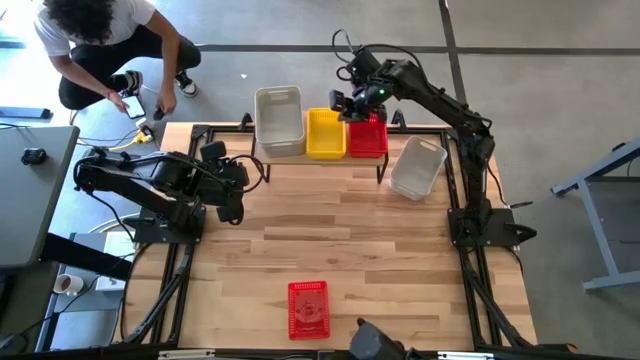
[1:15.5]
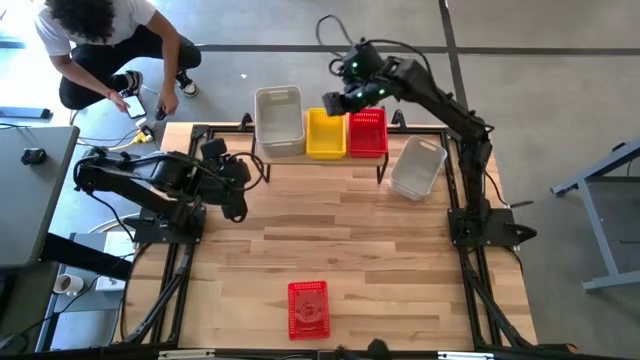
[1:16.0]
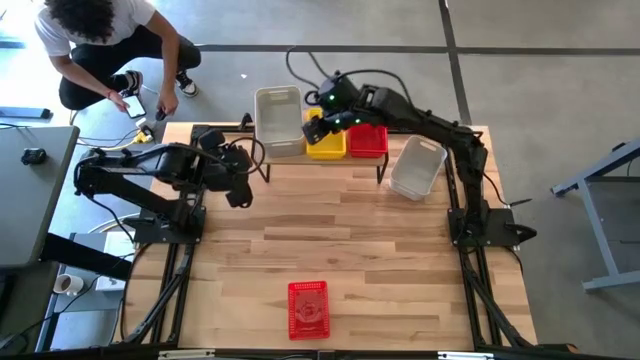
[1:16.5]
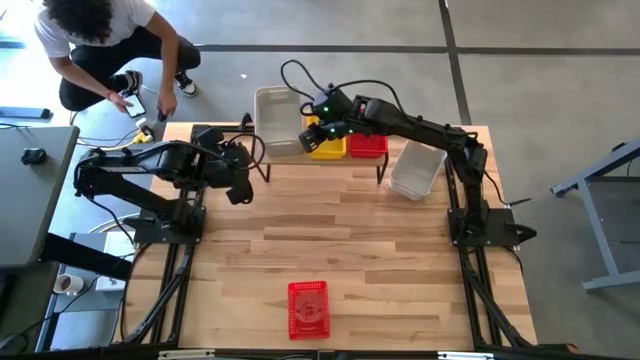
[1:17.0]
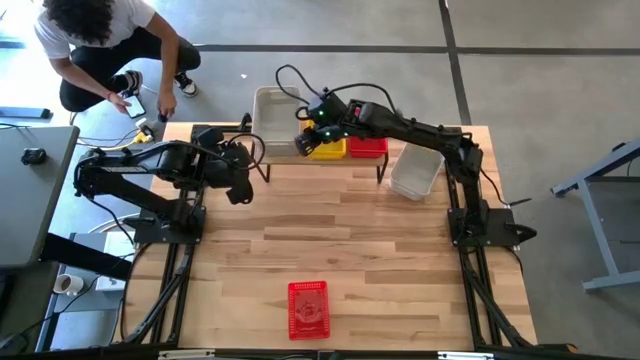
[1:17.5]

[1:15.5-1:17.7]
Task: Stack baskets on shelf by color
Adjust the stacked of gray bins on the shelf

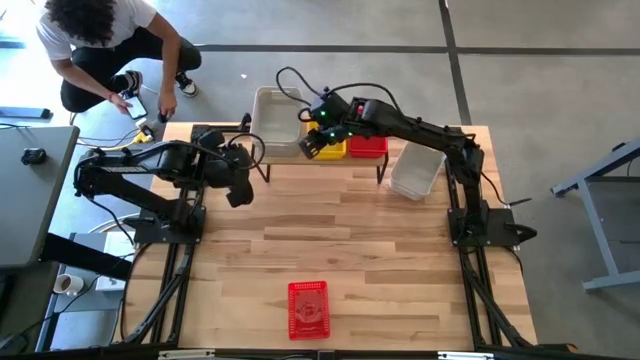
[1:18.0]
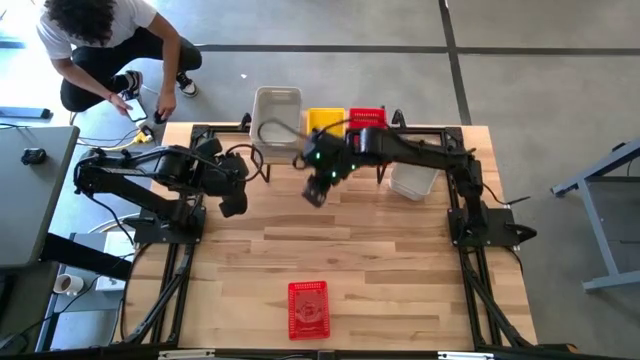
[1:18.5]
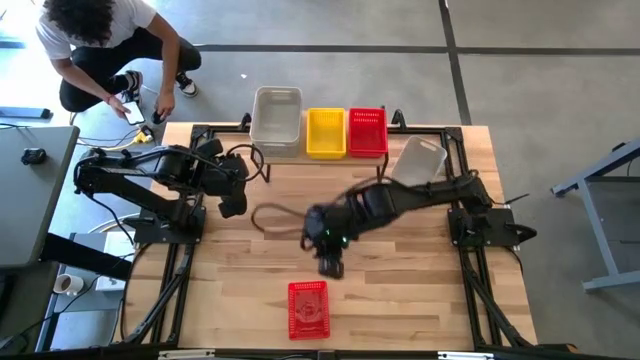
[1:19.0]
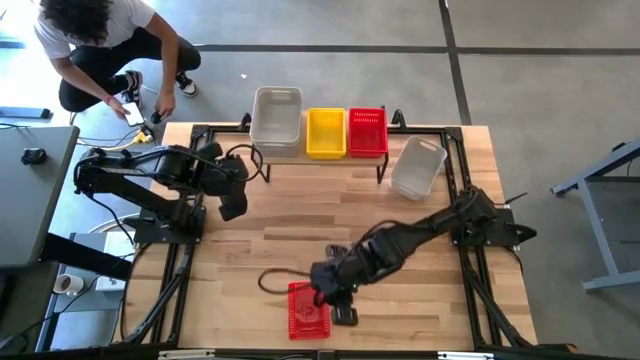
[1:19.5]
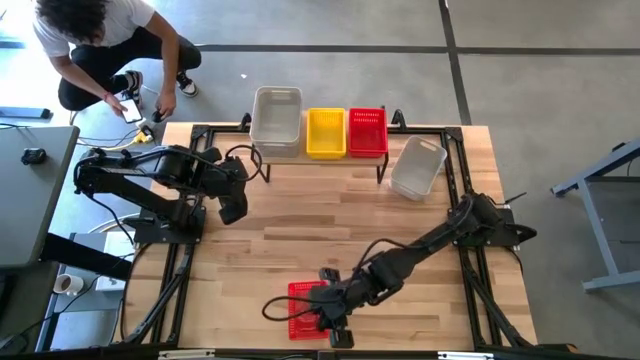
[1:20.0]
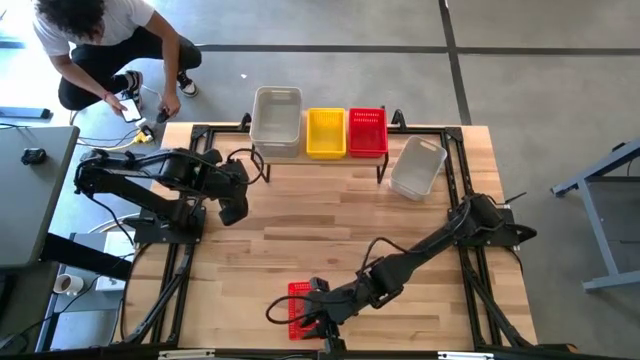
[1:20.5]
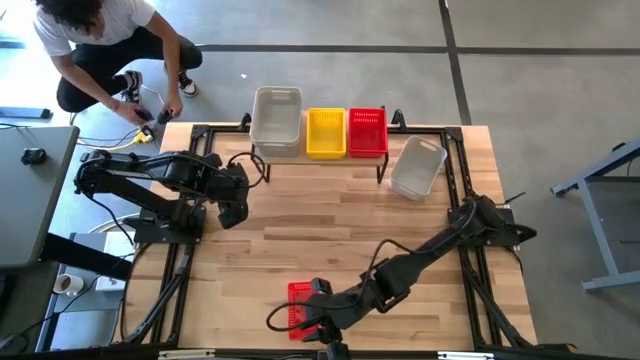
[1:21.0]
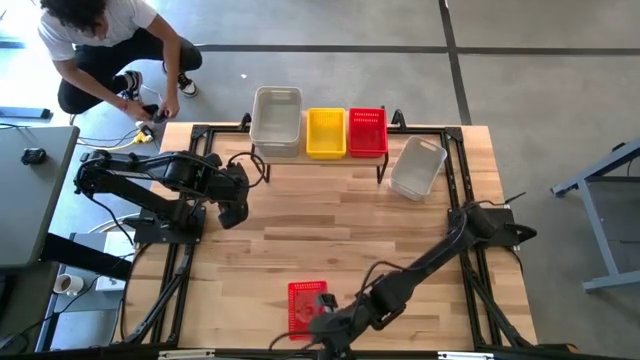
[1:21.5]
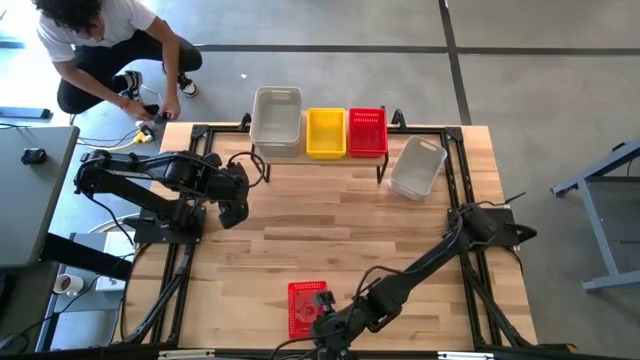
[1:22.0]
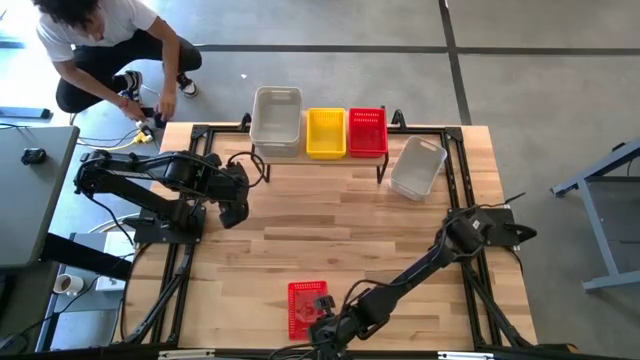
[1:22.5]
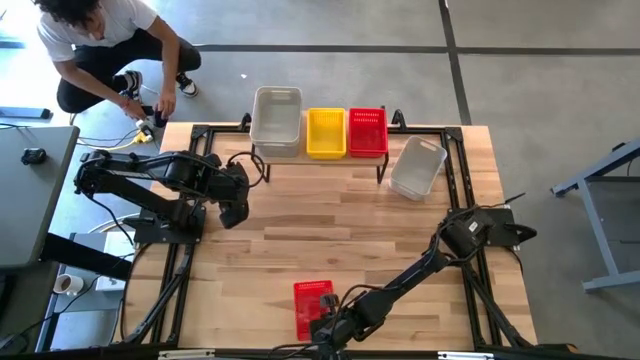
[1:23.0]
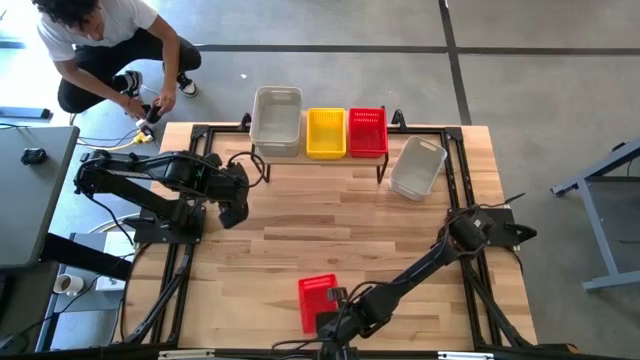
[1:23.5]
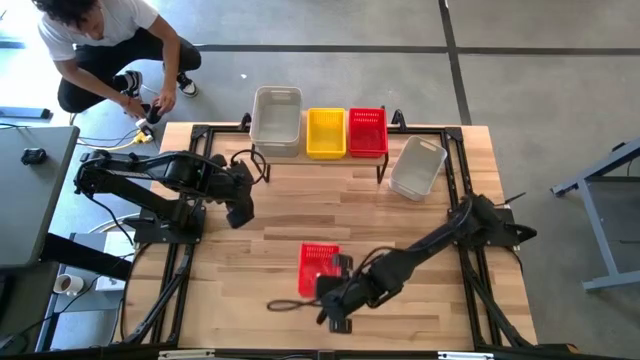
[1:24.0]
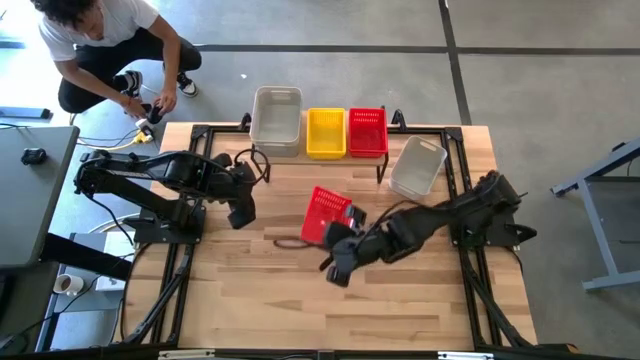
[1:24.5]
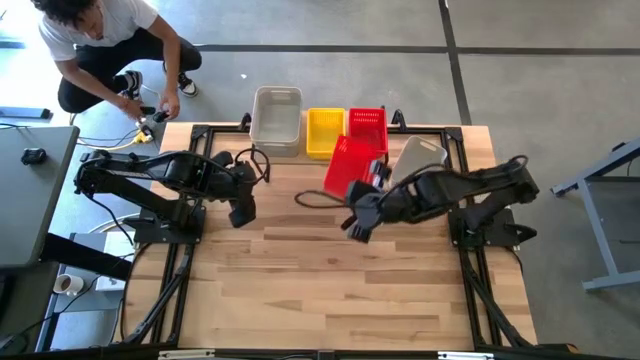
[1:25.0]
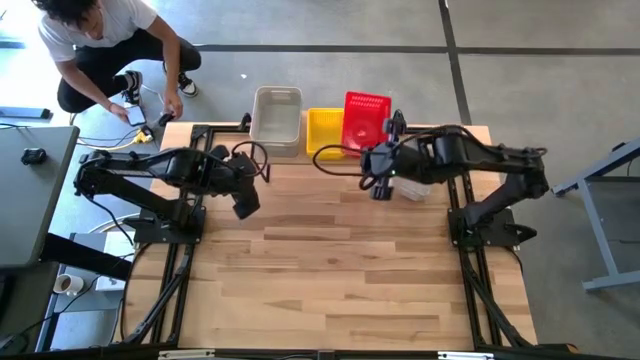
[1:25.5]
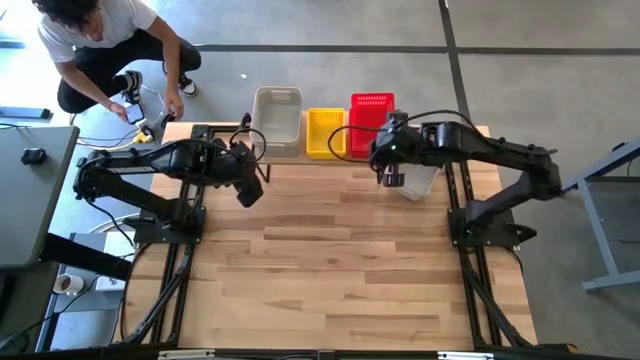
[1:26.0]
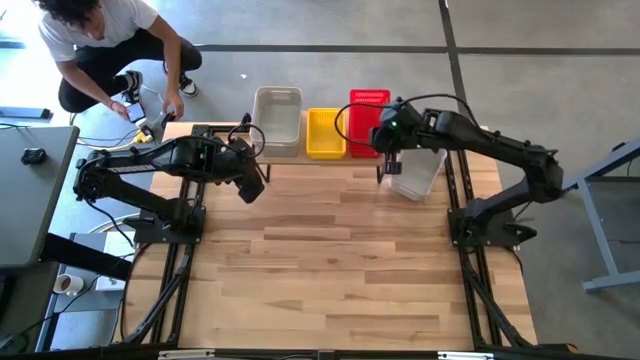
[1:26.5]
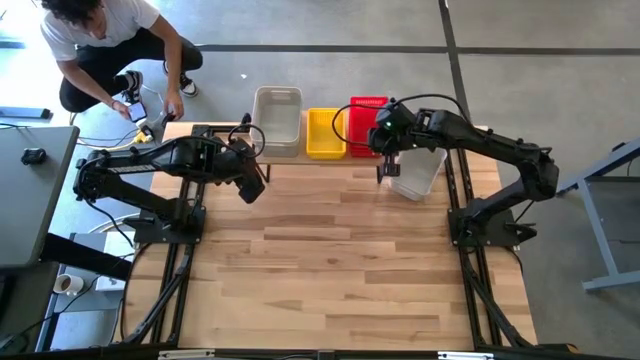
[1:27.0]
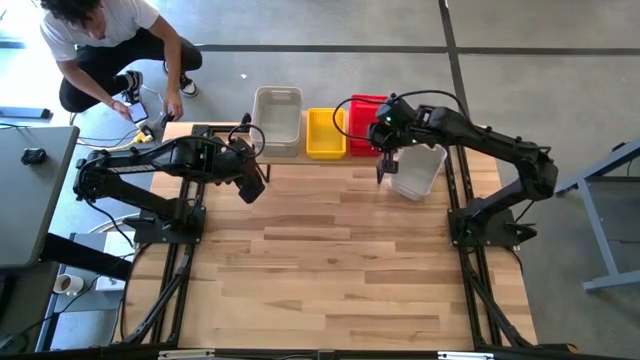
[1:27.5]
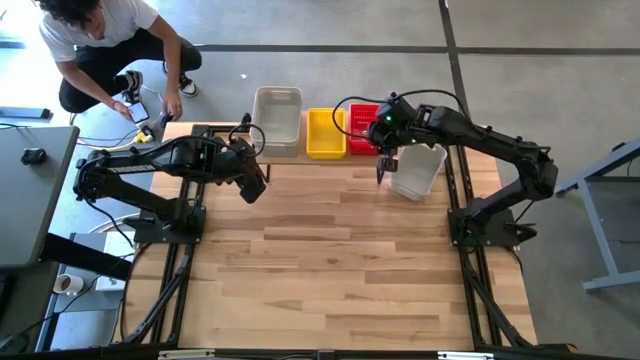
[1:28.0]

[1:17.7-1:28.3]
Stack the red bin on top of the other red bin on the shelf

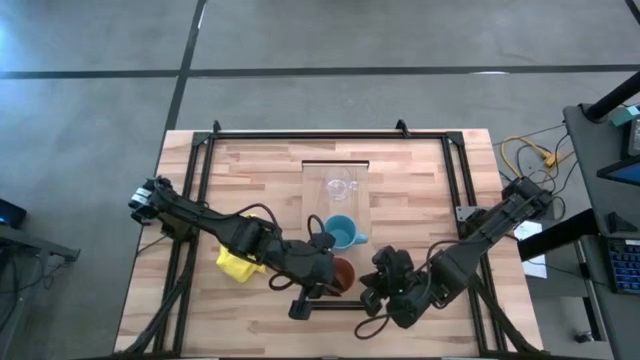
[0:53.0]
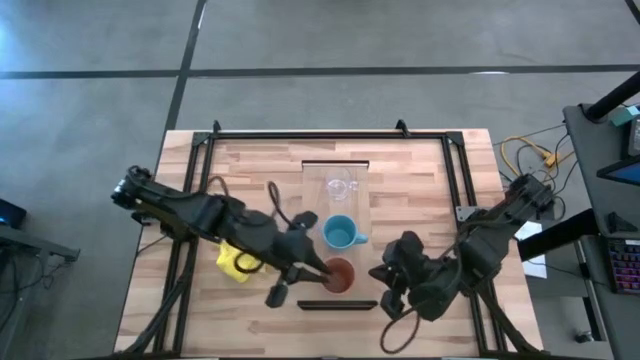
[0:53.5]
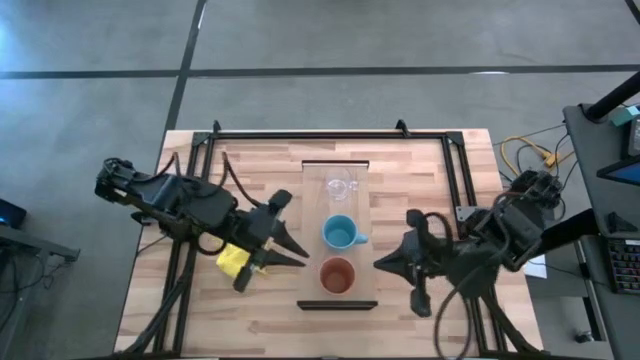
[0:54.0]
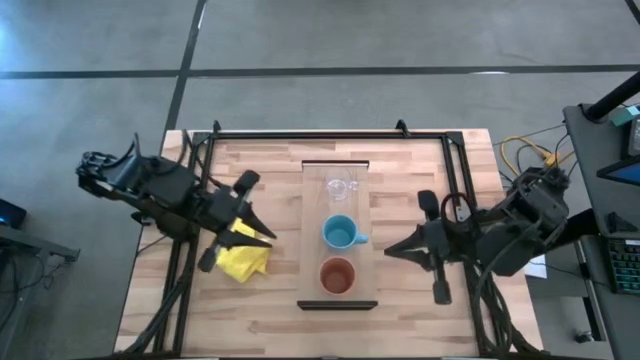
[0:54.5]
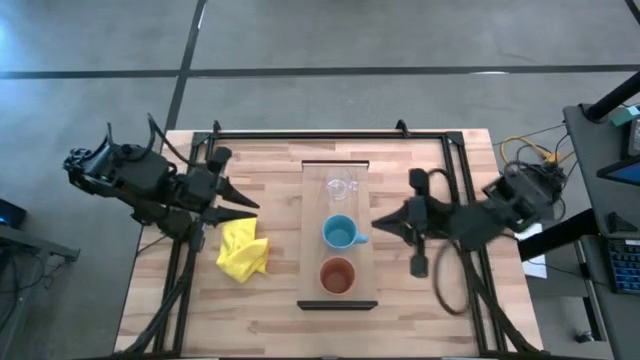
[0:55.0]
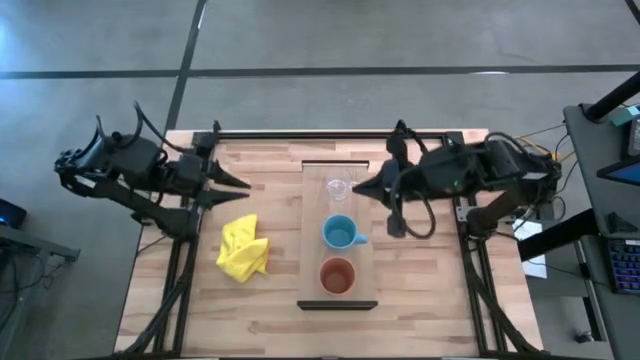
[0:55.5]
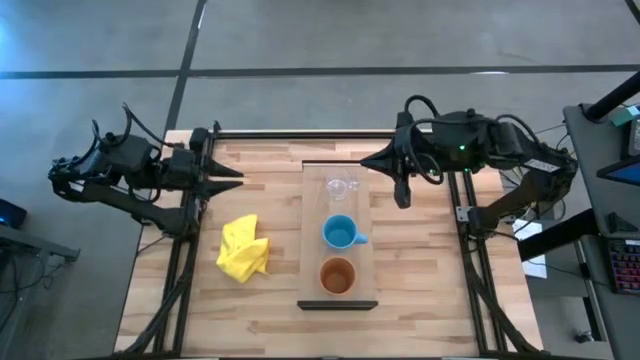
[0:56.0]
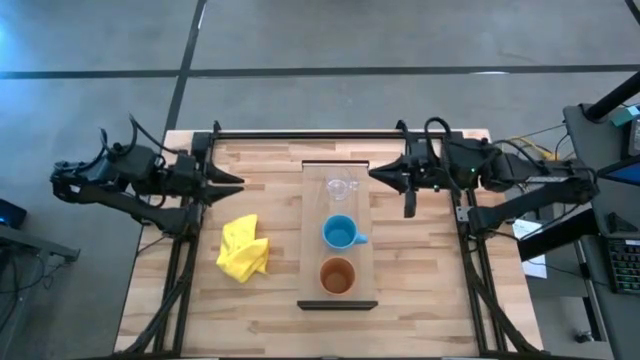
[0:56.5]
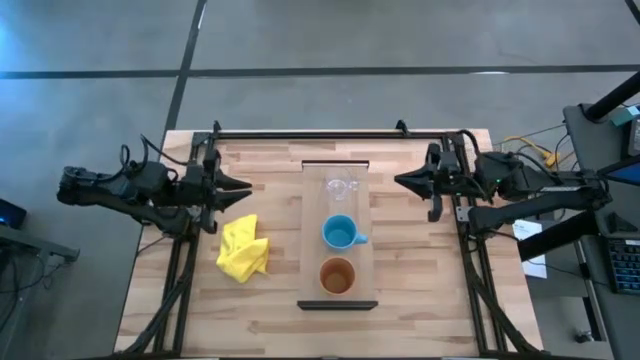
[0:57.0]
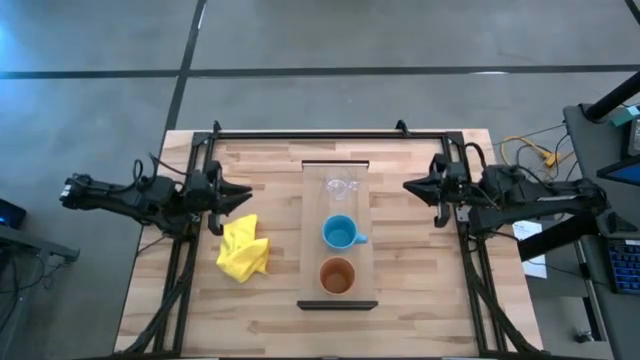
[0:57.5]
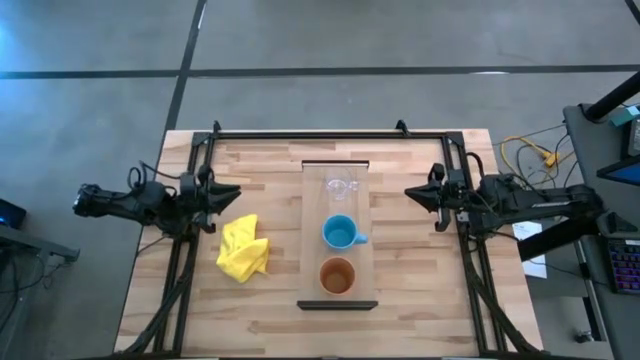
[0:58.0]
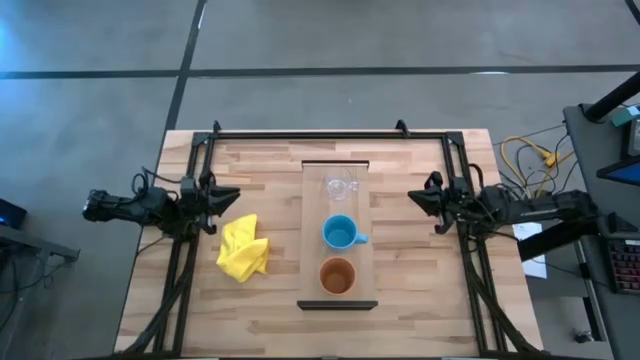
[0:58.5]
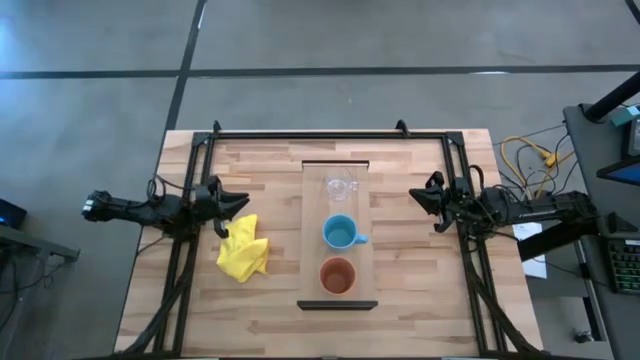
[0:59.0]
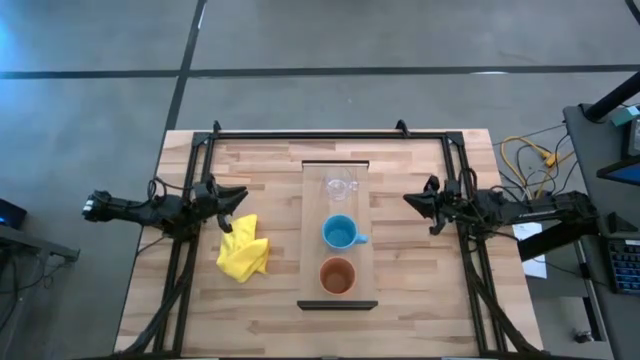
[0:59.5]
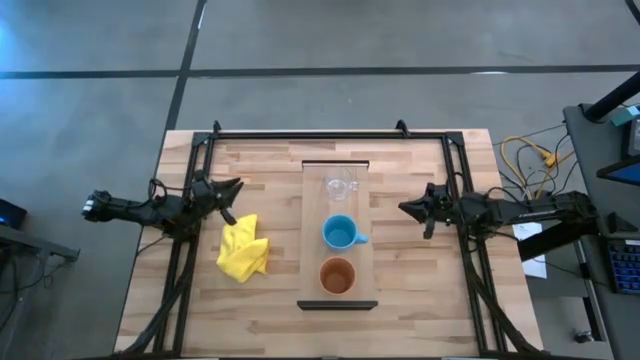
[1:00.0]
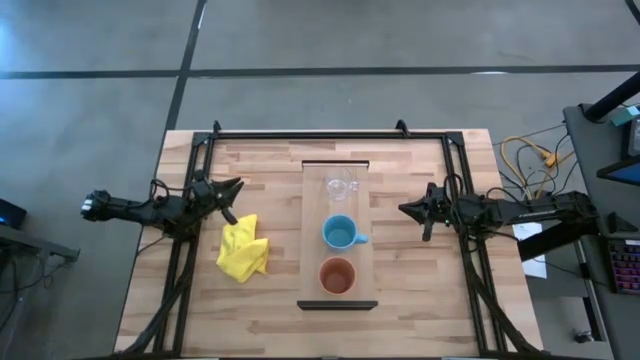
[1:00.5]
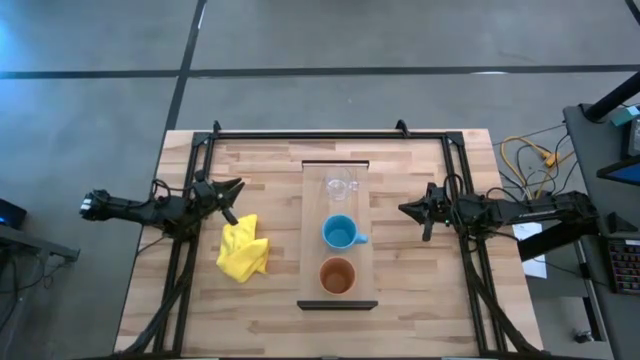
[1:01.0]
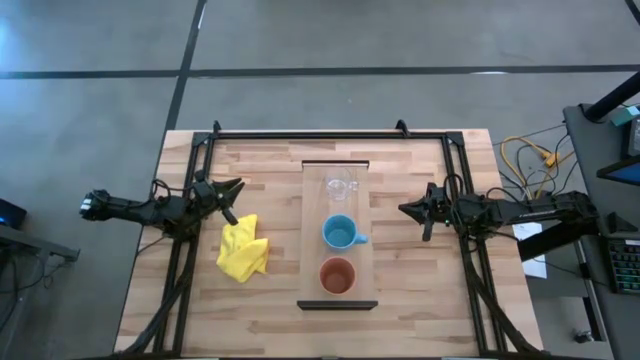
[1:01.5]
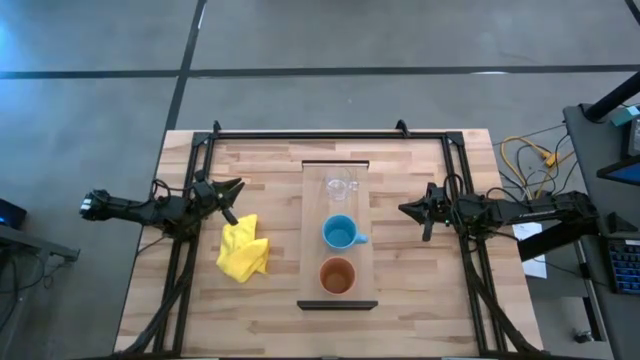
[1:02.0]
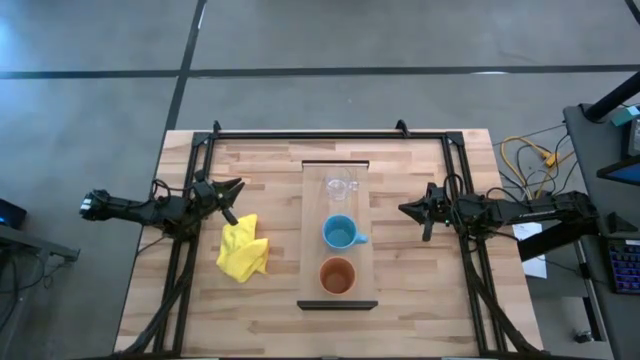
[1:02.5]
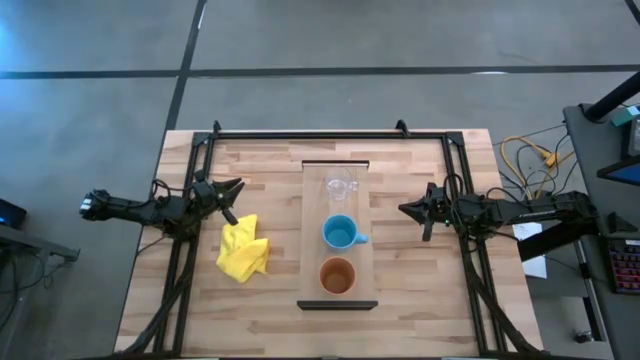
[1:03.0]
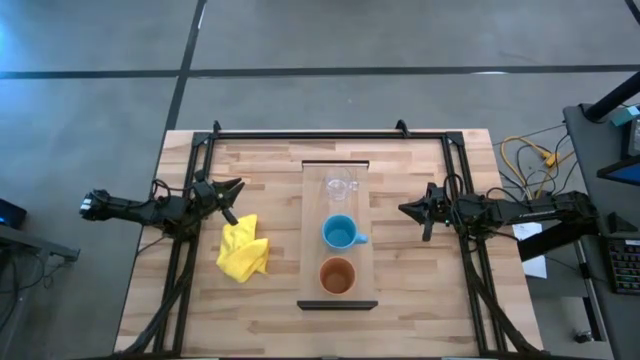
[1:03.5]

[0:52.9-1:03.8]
Task: Stack small to large cups/mugs on shelf
Return to Home Position
